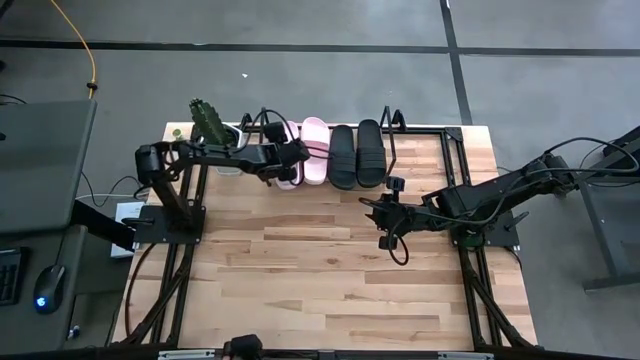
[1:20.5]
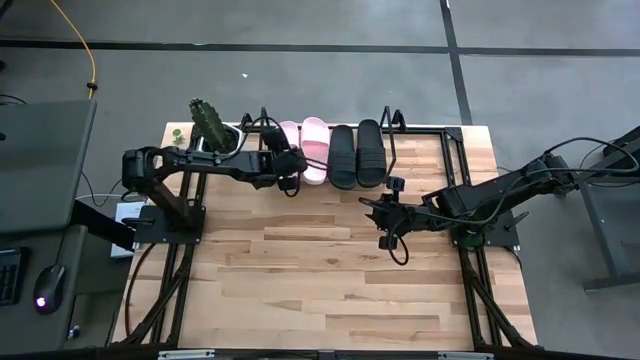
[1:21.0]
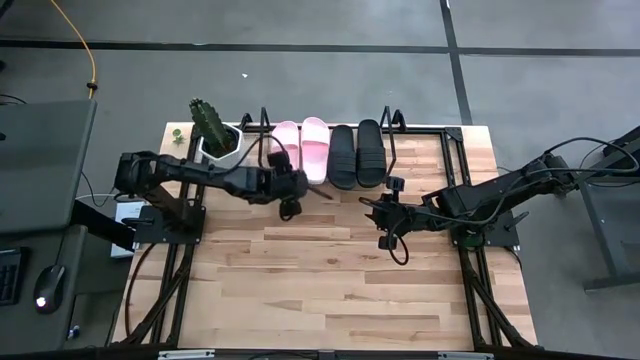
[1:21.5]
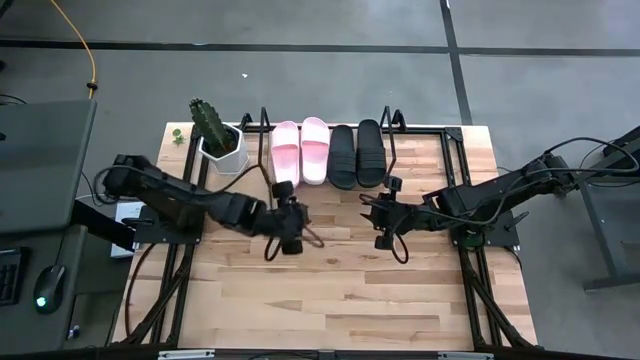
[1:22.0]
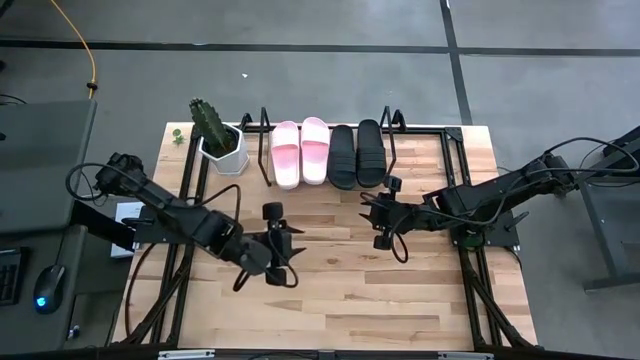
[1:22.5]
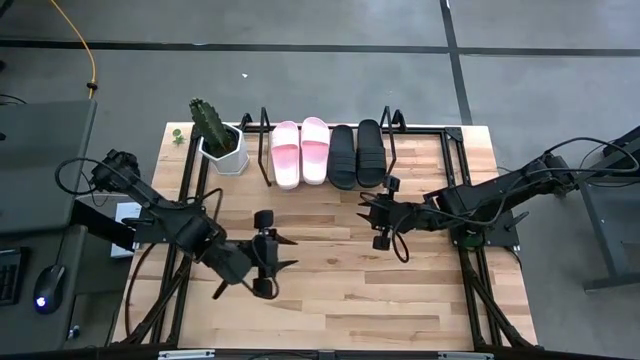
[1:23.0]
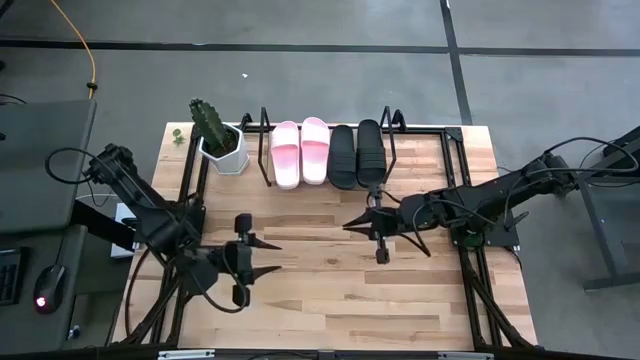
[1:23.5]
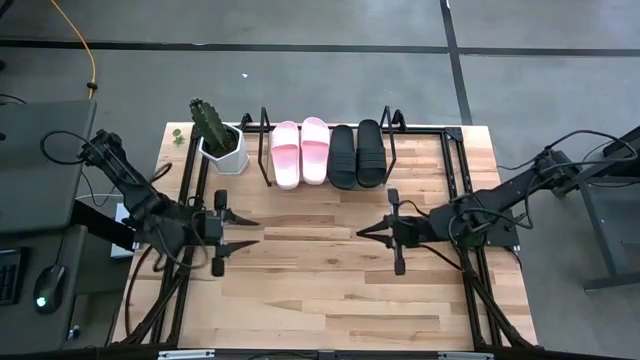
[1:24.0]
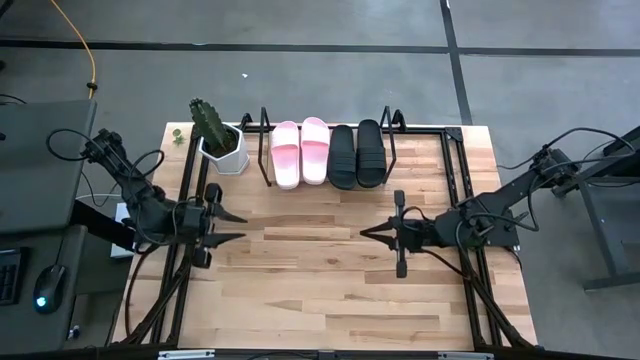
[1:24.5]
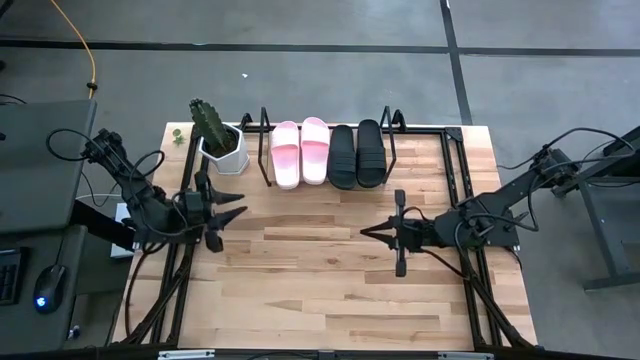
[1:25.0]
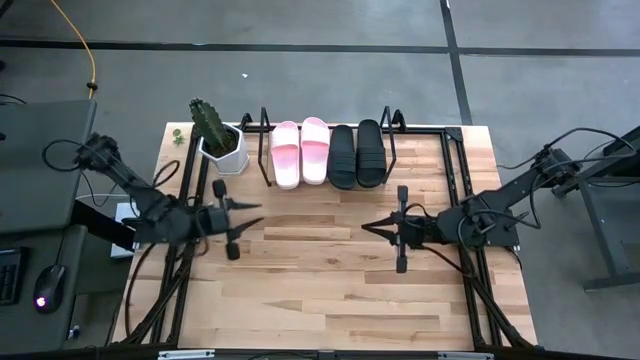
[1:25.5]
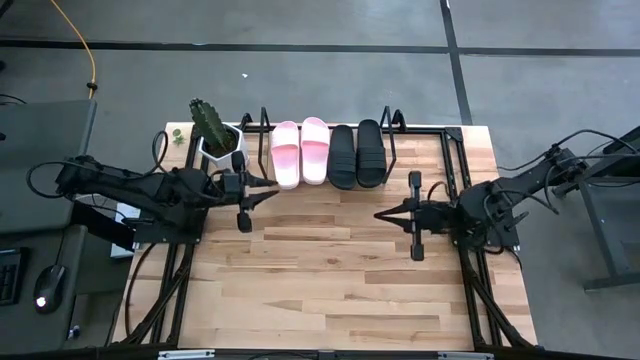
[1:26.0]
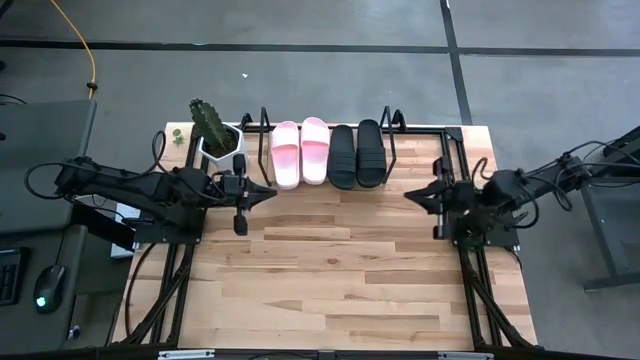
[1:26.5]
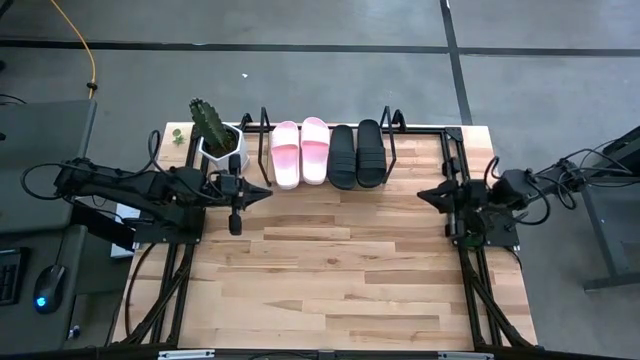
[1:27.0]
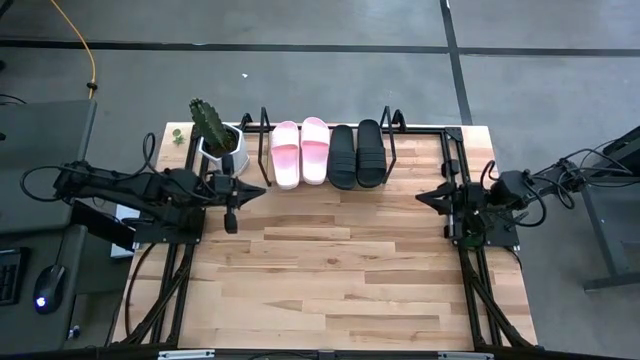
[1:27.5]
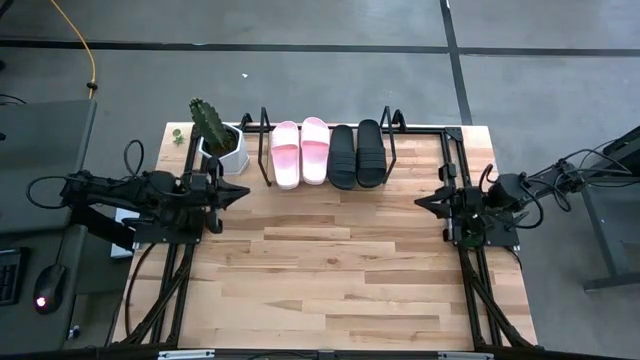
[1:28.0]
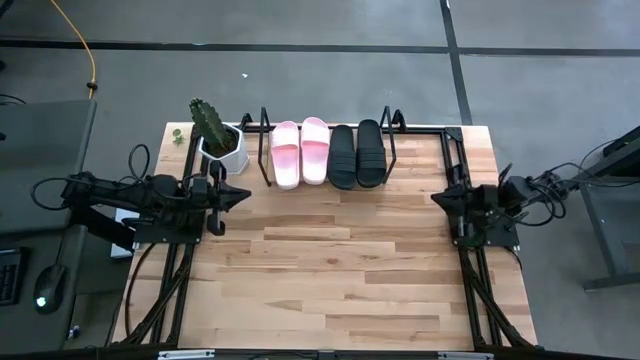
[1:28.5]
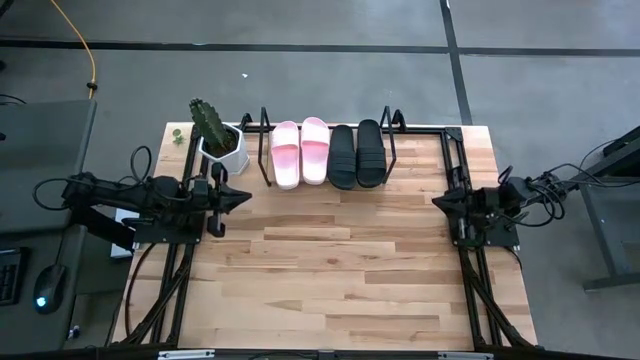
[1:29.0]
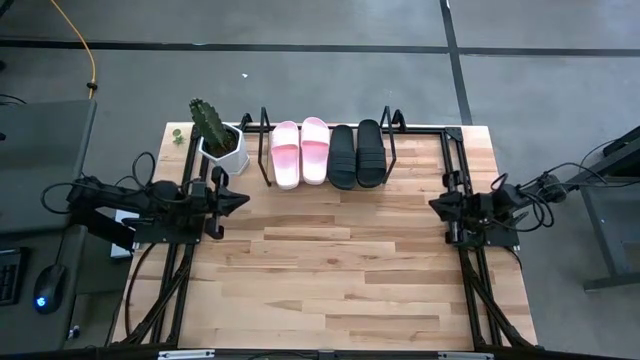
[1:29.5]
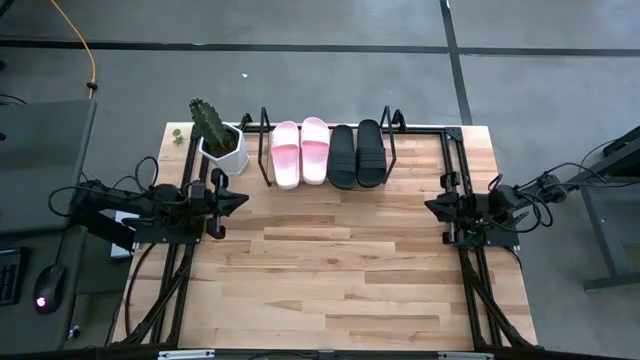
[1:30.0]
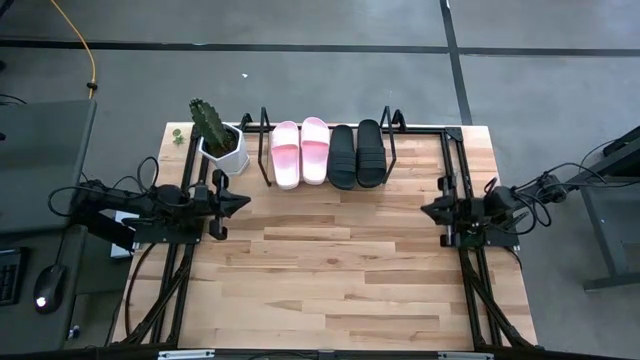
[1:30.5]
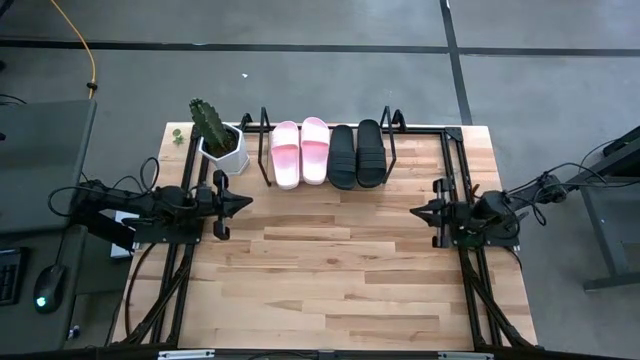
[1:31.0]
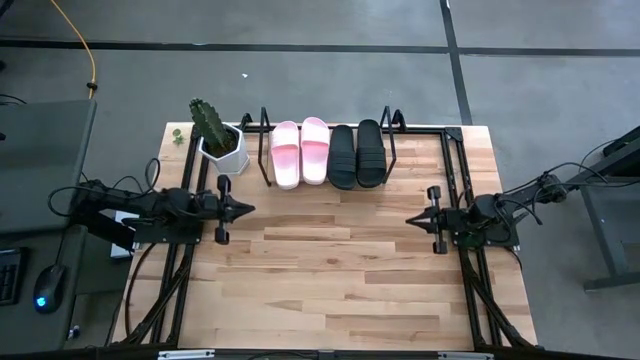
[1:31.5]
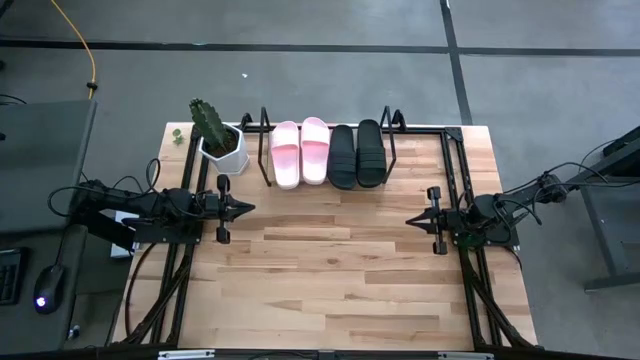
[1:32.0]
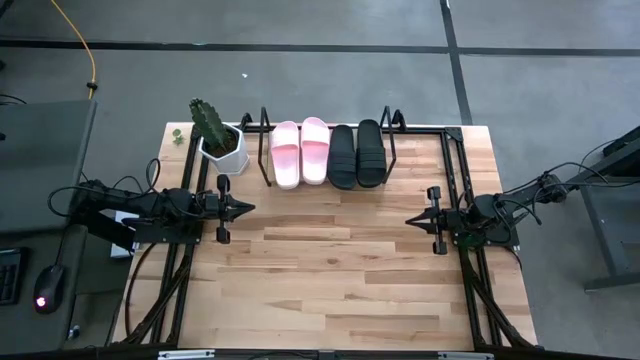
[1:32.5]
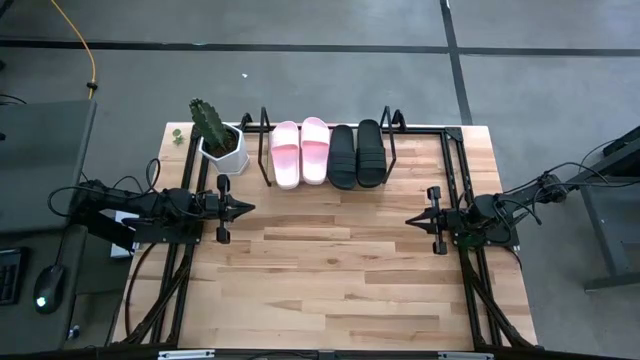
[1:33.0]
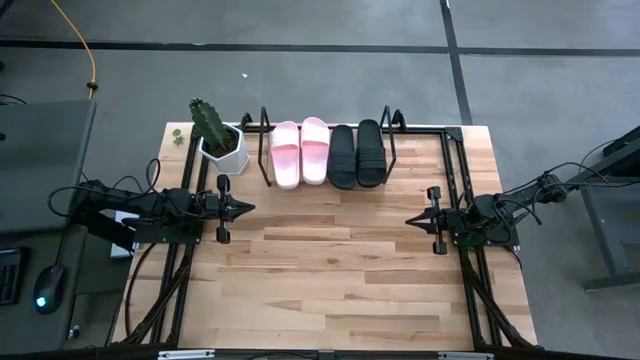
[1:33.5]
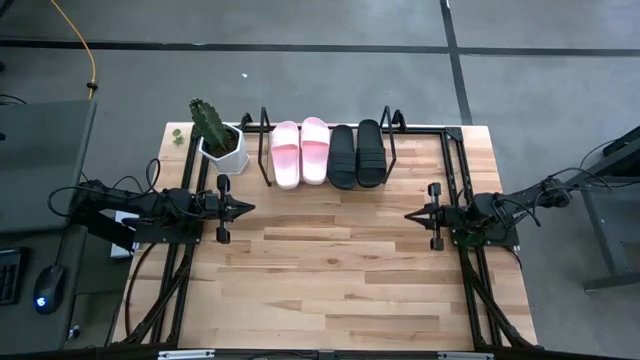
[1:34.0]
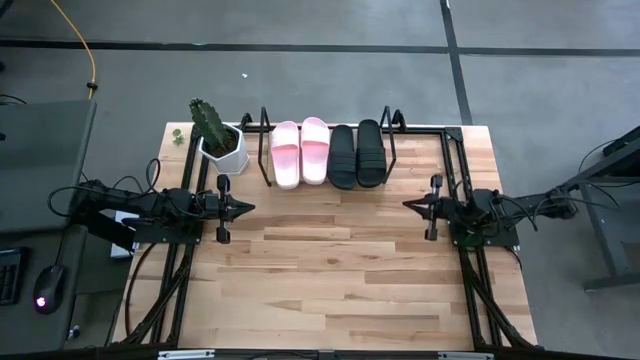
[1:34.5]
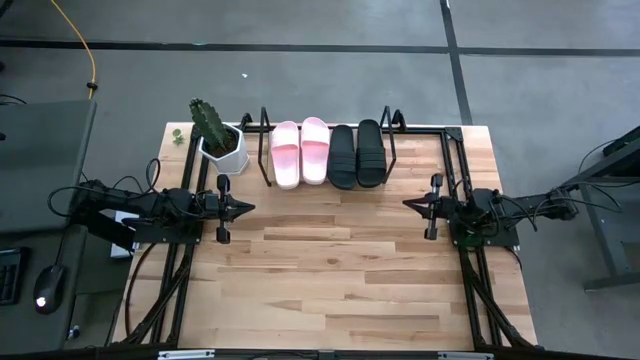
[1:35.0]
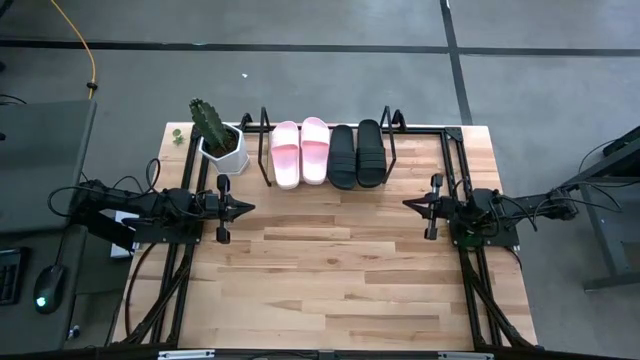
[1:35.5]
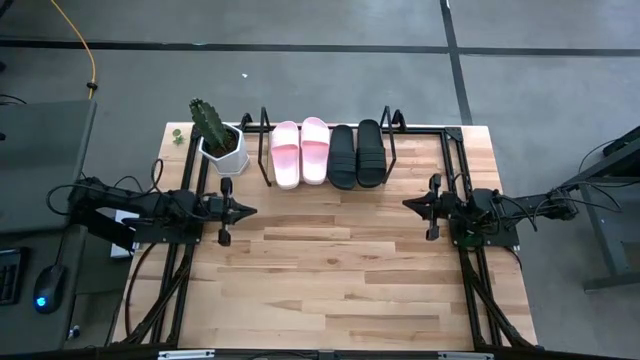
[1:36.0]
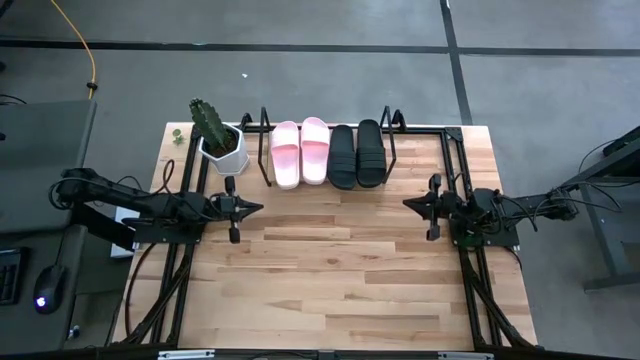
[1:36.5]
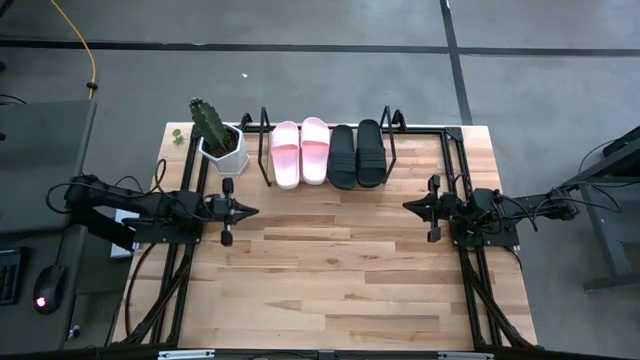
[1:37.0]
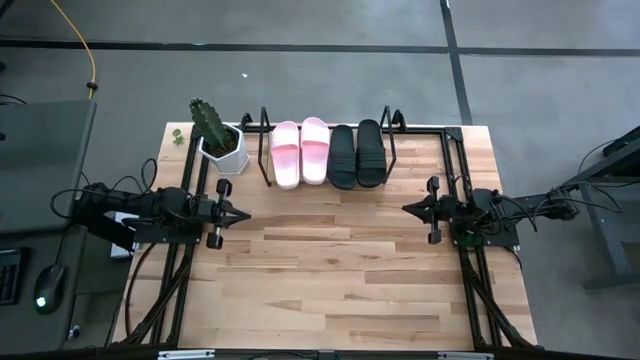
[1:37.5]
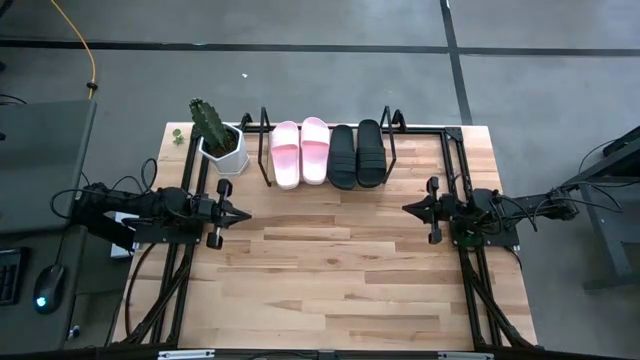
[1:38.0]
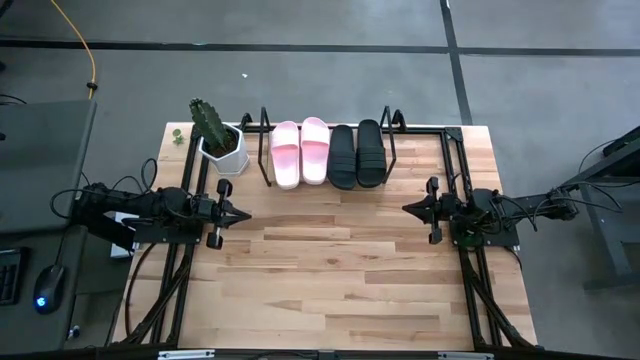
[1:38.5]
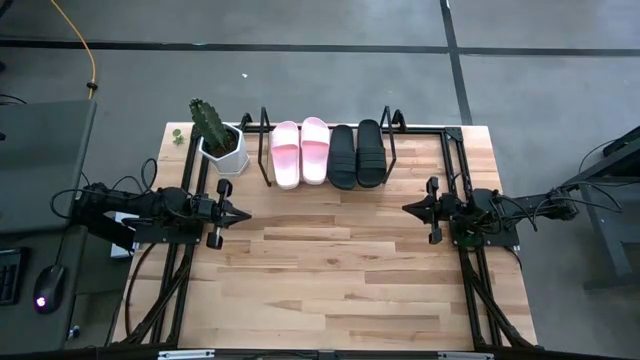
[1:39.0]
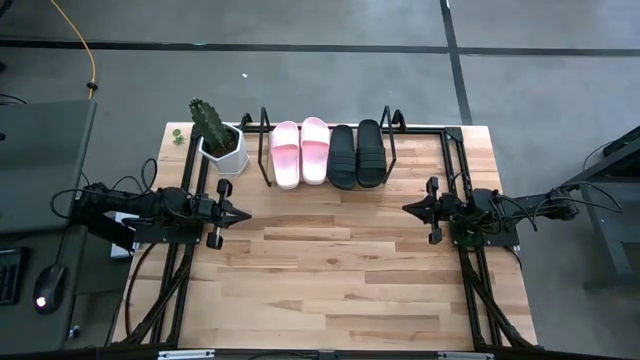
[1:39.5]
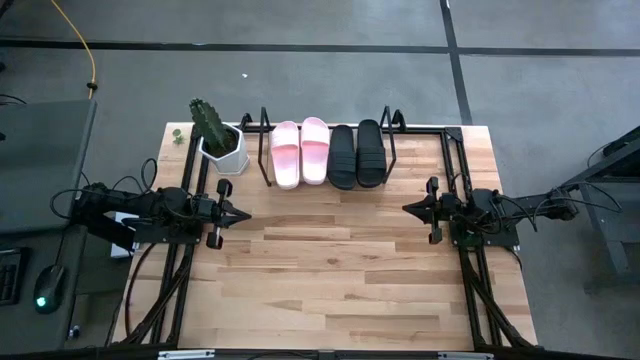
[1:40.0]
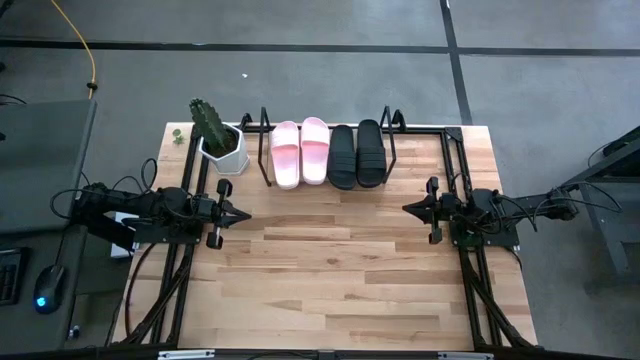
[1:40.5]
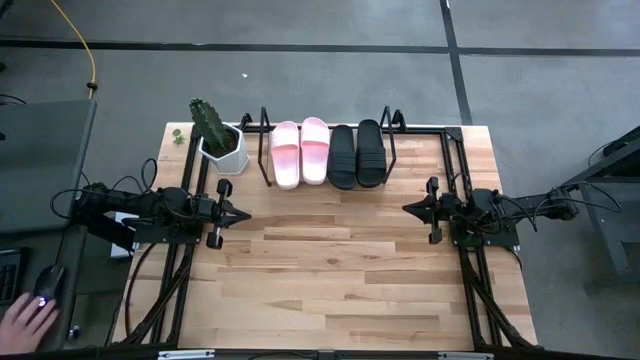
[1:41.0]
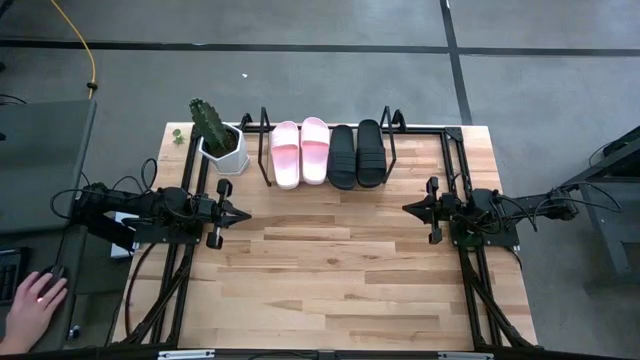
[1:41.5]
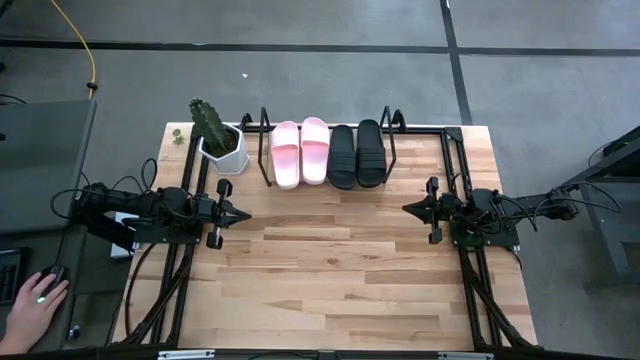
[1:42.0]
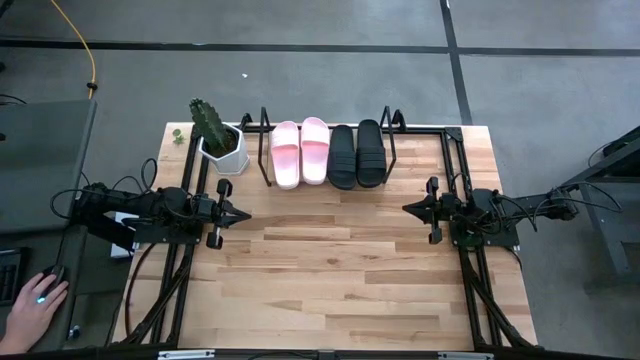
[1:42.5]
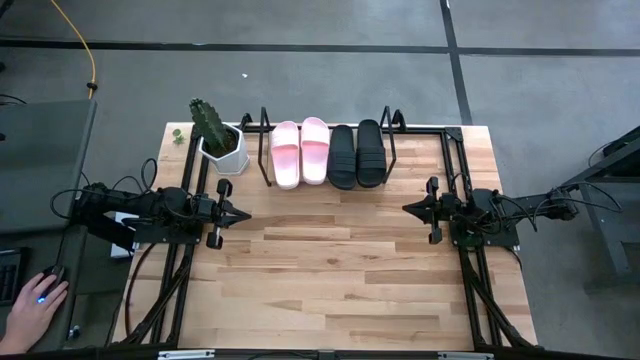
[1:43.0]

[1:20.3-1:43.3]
Task: Pick and place slides into the shelf
Return to Home Position
